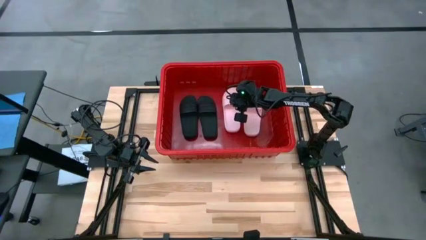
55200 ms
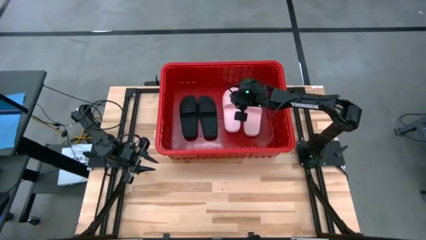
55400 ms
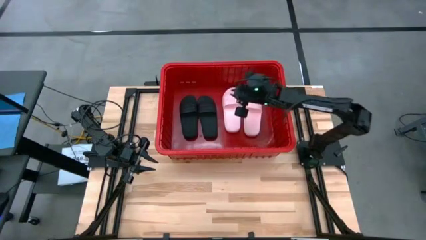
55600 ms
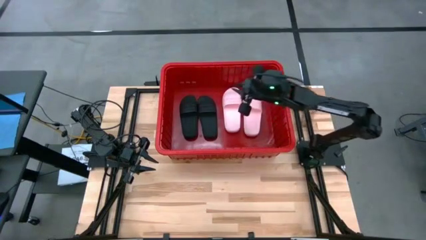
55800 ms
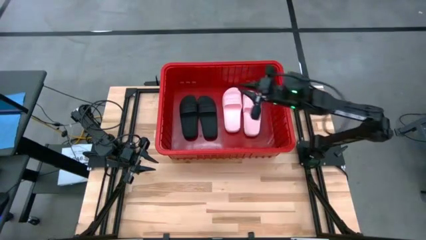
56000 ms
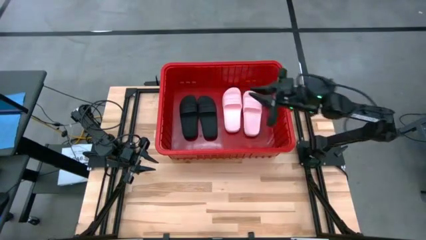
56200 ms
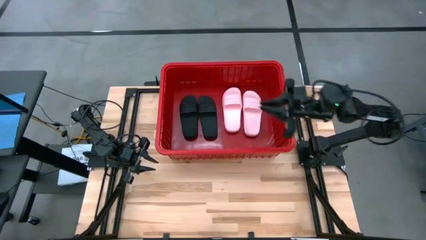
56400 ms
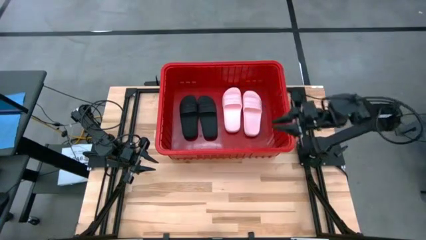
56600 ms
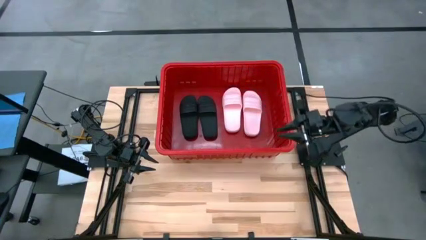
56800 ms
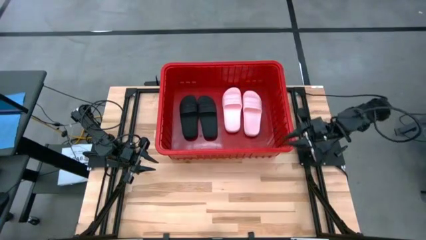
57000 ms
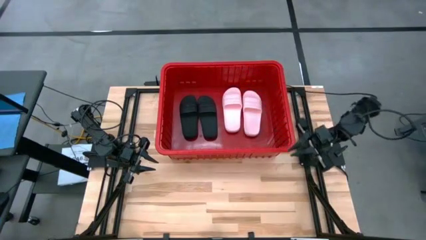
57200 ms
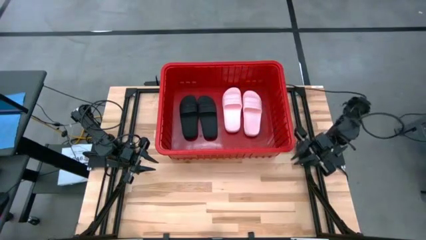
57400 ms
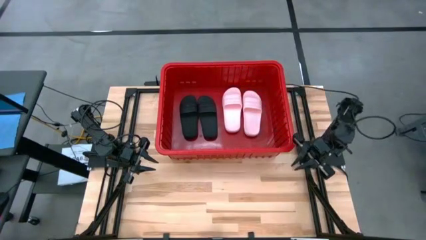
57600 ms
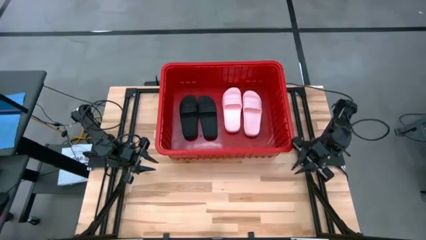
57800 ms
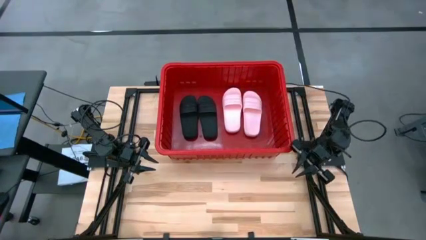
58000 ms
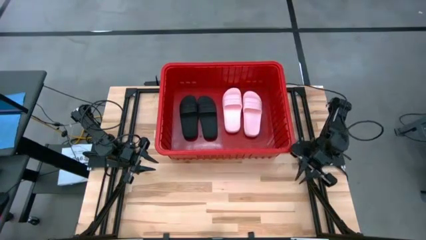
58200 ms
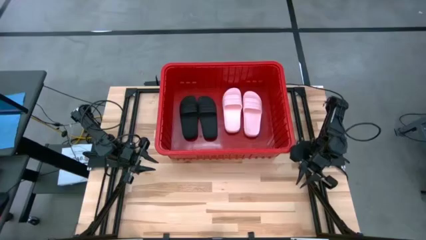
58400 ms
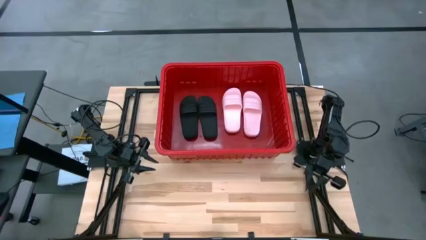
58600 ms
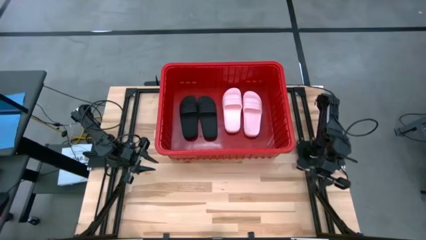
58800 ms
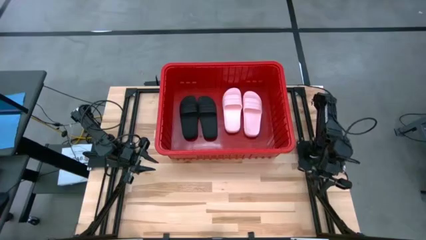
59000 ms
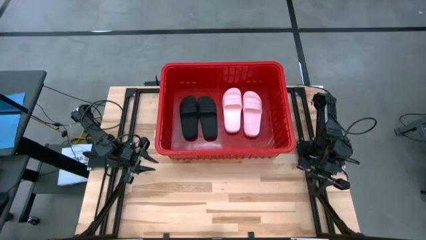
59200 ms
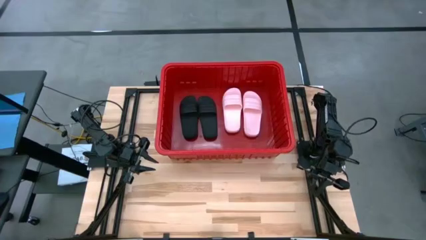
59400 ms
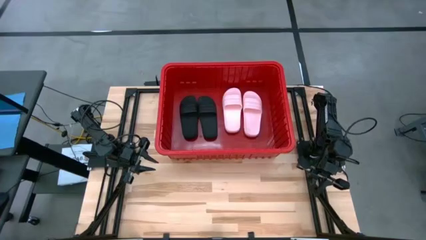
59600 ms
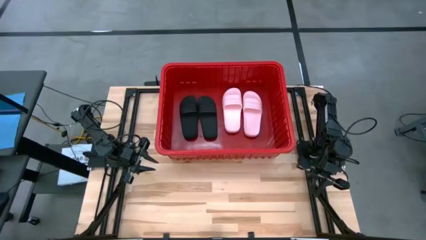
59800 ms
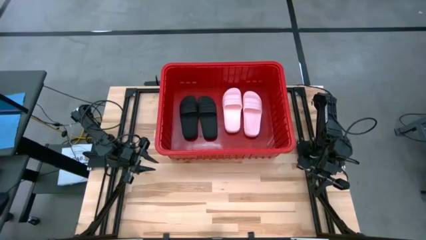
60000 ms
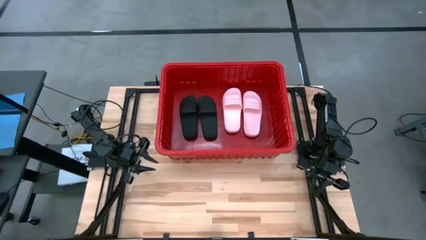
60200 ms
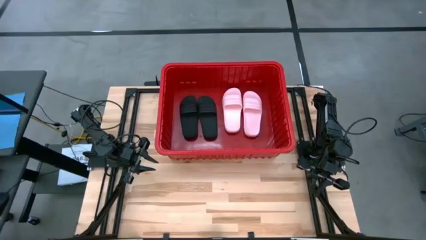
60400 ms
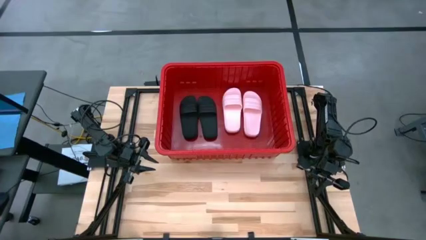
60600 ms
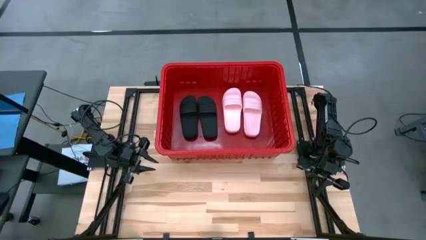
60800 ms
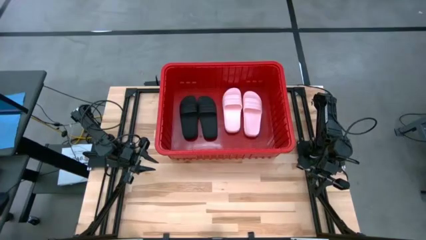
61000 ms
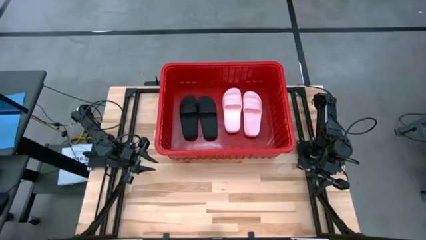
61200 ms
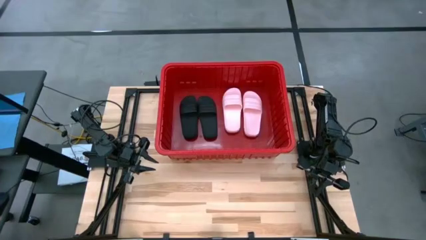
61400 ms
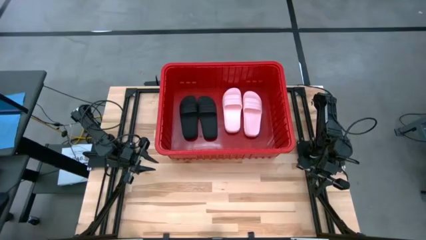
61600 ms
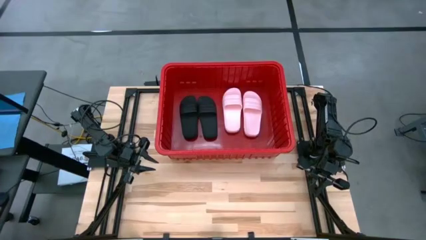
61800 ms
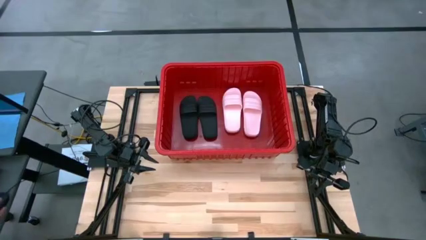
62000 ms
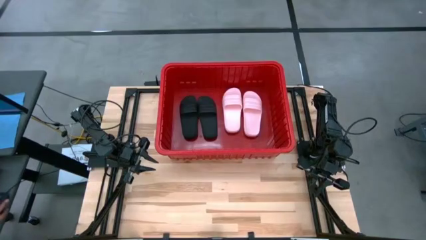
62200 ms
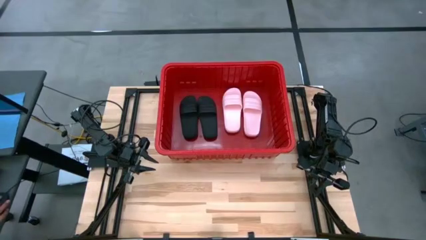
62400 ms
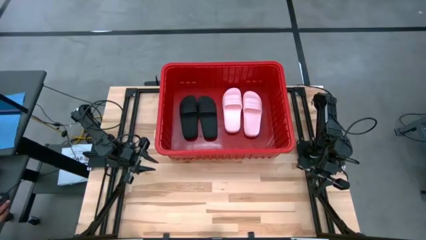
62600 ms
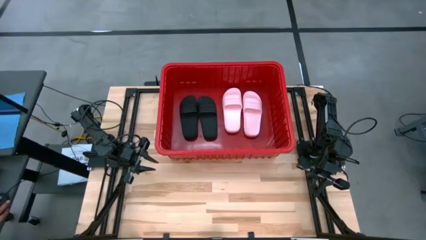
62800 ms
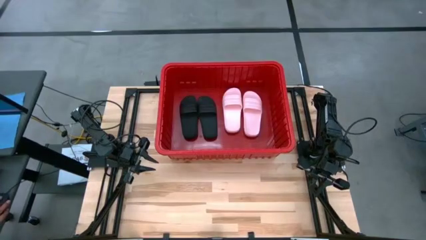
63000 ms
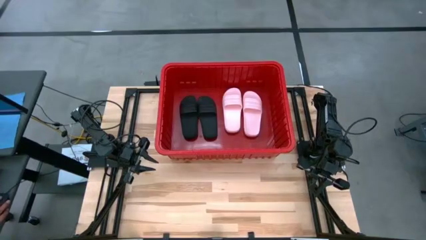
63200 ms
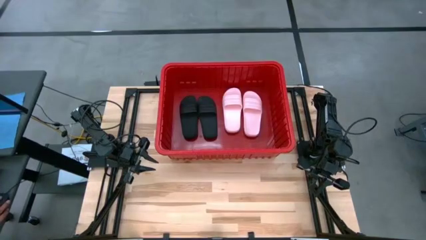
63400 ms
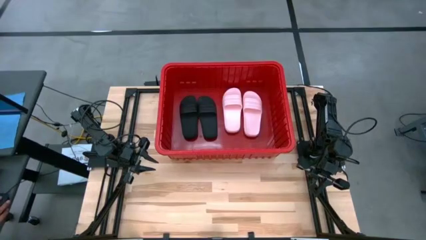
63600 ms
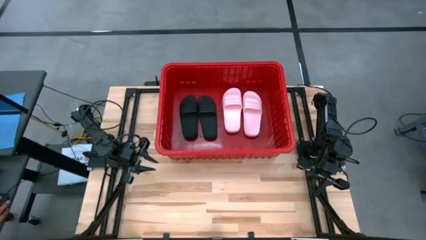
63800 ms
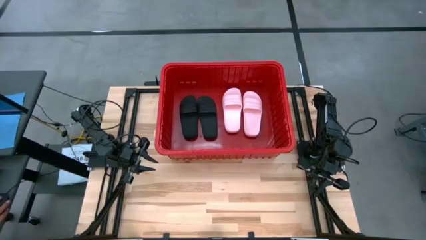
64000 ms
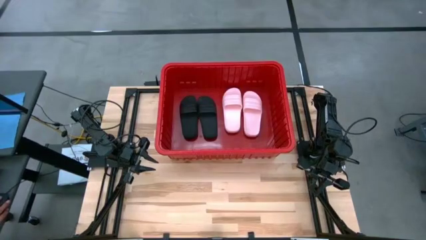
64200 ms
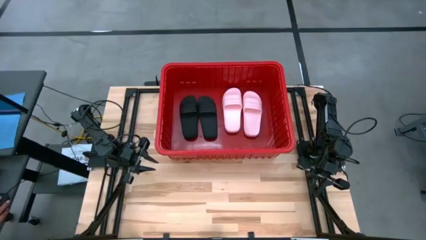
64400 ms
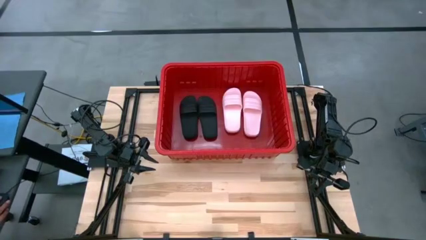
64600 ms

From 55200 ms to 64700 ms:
Task: Pick and place slides into bin
Return to Home Position

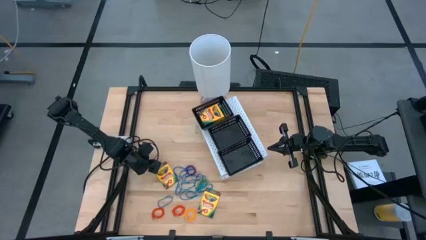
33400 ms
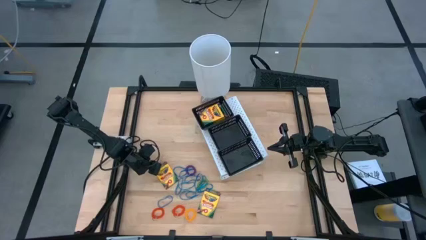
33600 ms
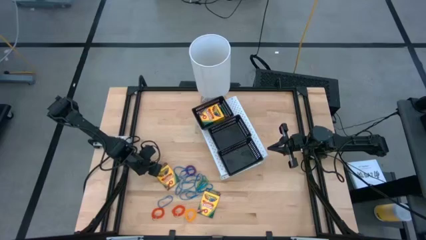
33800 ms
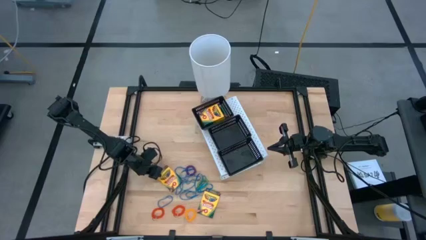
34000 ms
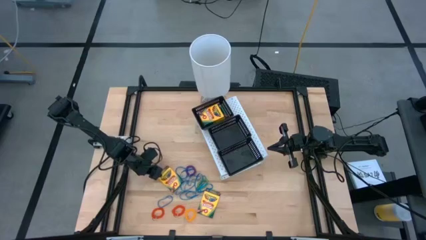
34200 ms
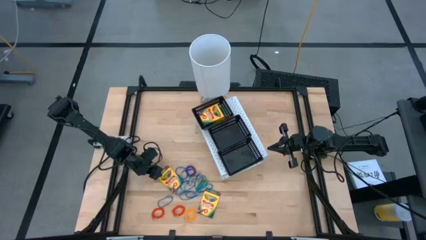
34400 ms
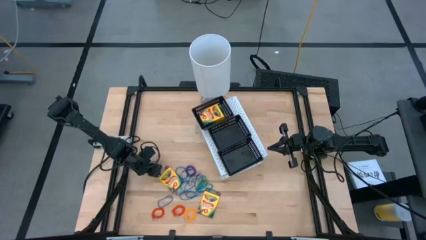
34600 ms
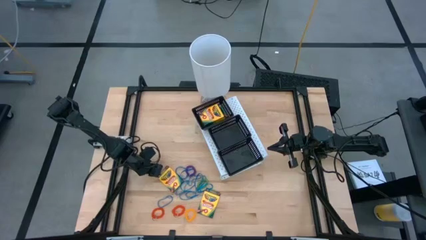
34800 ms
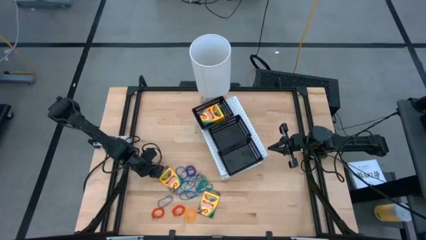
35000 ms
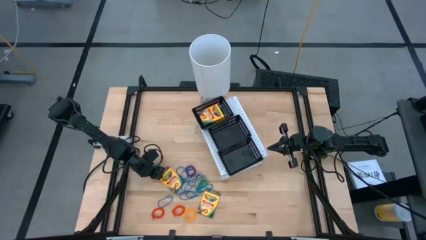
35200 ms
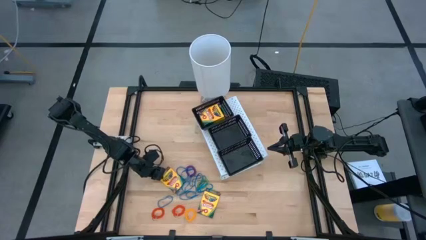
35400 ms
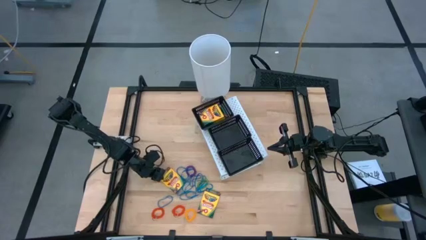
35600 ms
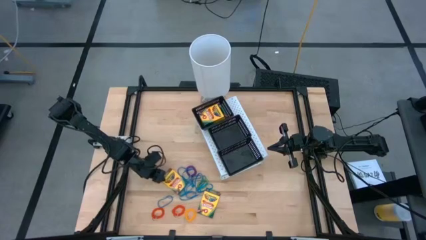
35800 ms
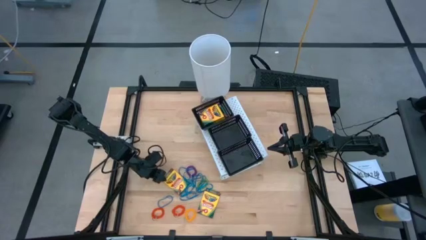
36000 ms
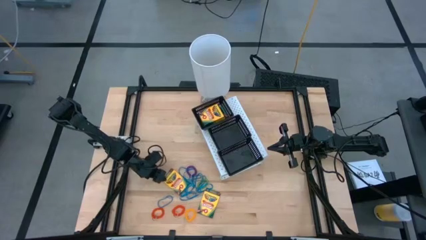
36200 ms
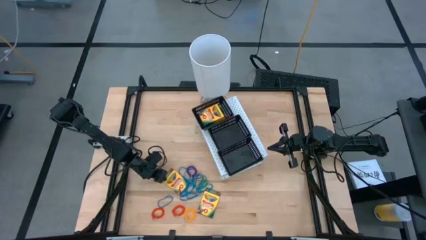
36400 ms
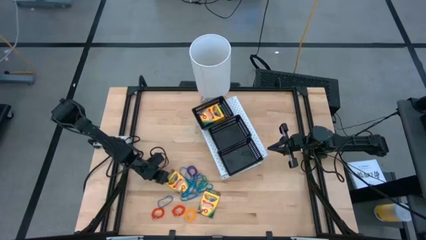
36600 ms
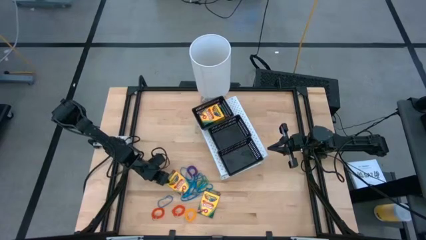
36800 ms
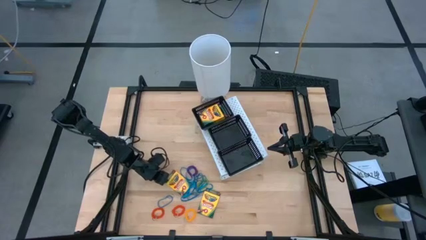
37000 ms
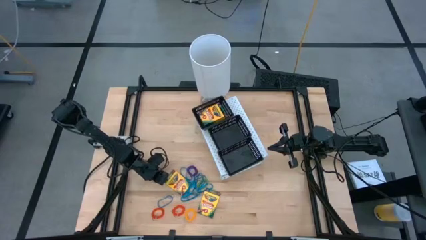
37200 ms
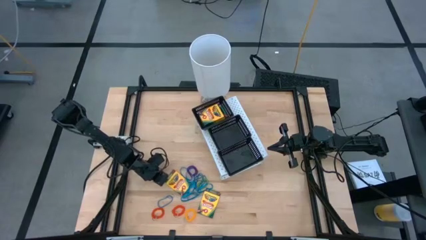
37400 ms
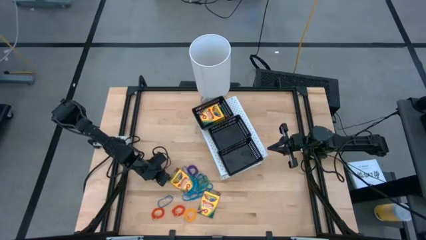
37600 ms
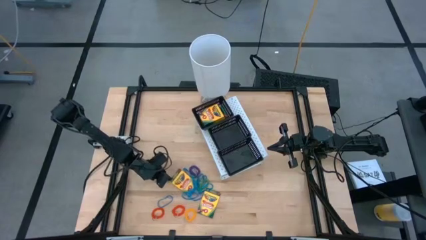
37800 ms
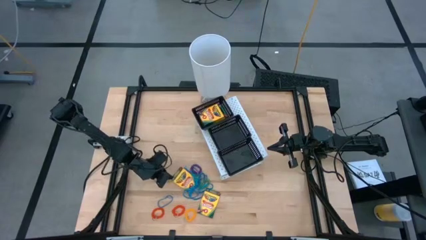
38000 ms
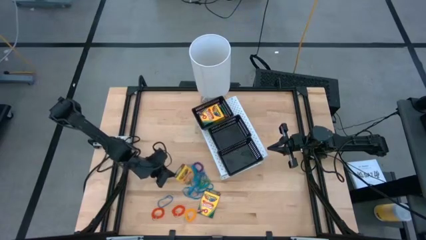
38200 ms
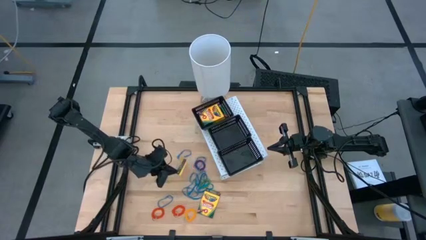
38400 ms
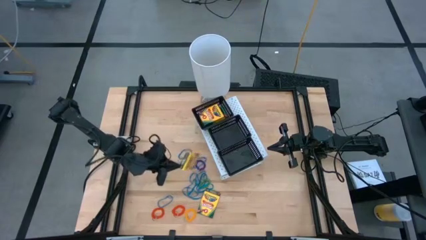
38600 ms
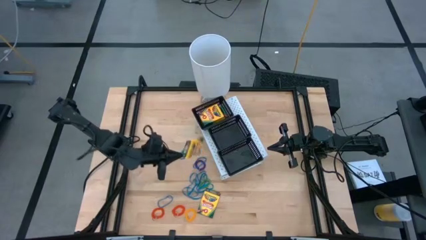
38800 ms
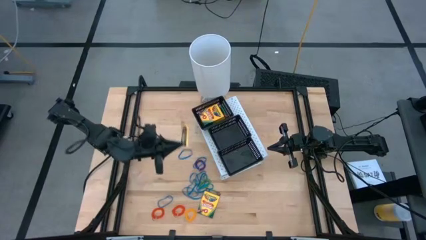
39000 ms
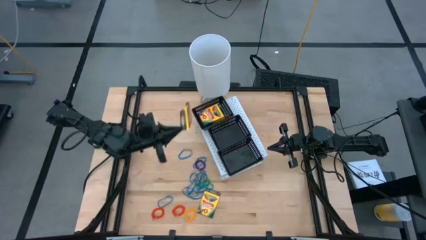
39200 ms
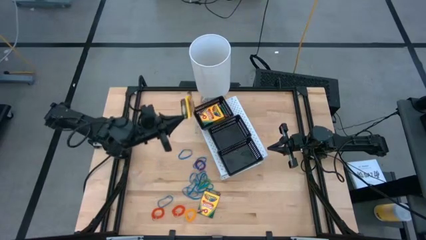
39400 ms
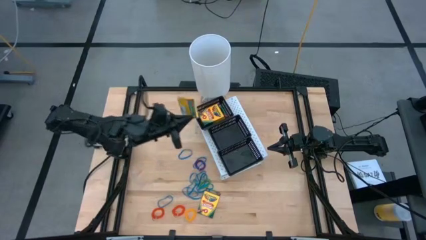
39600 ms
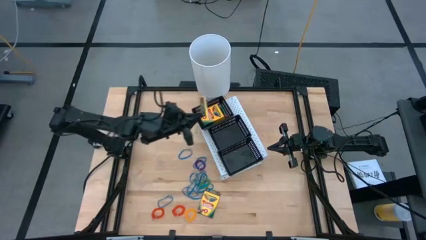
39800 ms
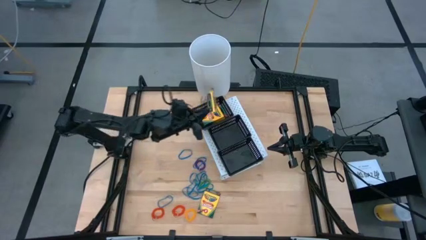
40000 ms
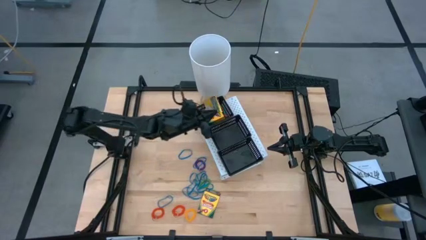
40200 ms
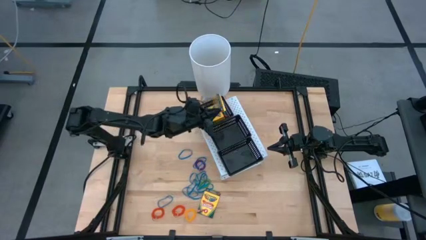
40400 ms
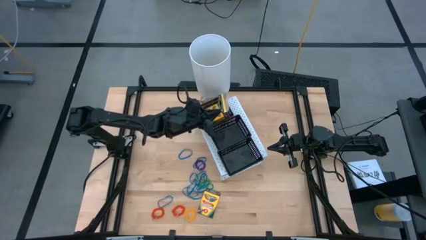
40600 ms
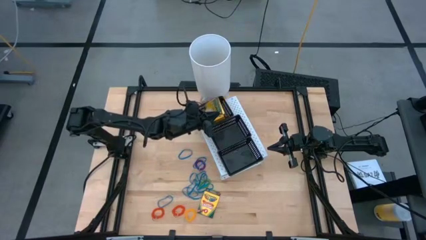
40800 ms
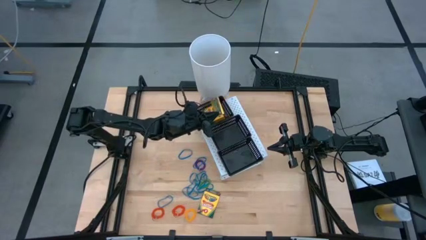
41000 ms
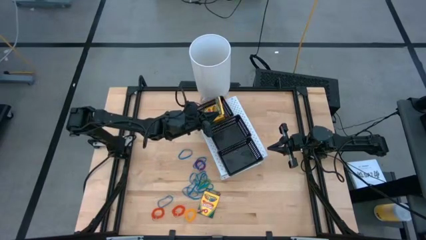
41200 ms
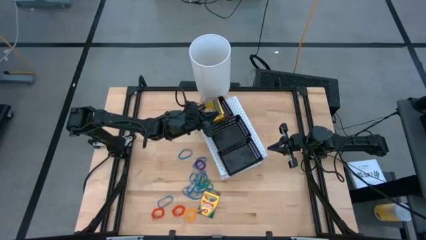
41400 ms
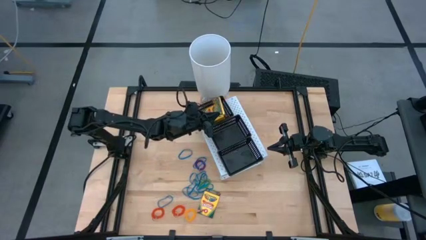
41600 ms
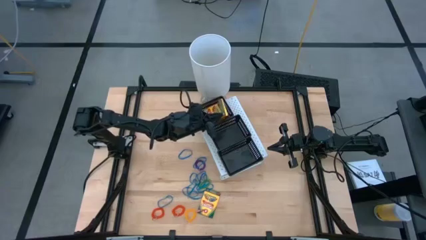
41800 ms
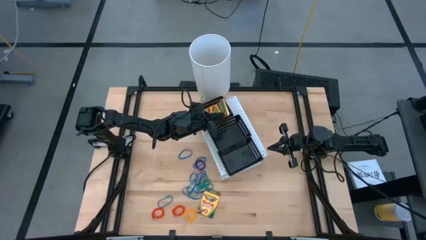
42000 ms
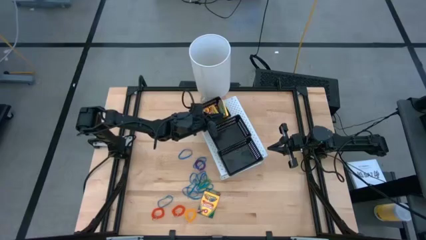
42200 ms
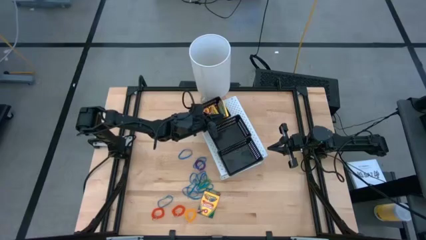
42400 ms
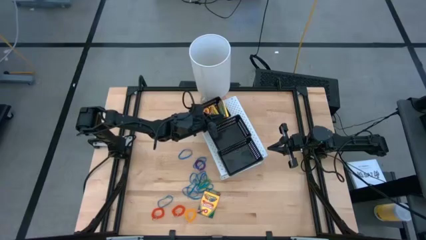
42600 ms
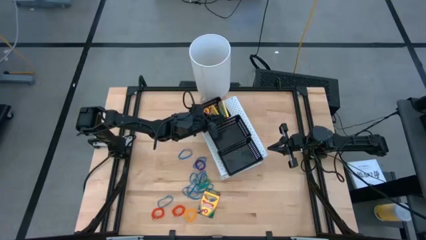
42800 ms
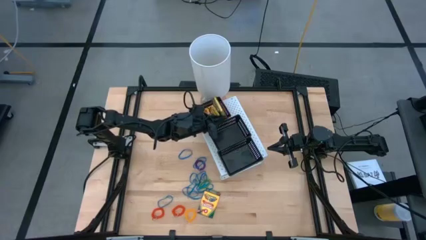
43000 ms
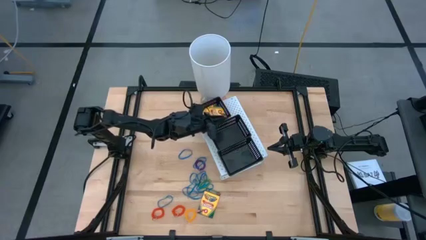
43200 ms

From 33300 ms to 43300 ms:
Task: Pick & Place Office Desk Supplies
Put the crayon box into the top black bin on the shelf
